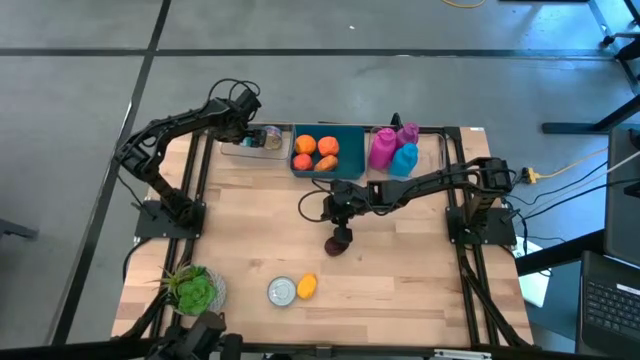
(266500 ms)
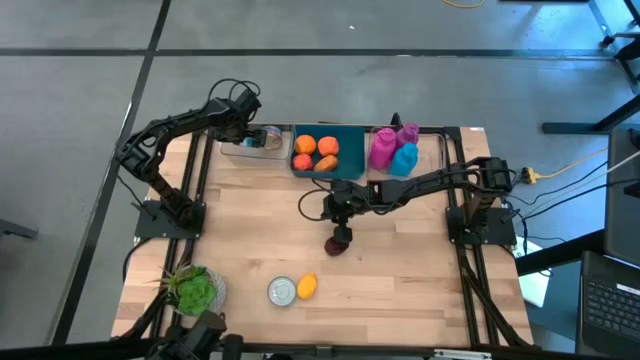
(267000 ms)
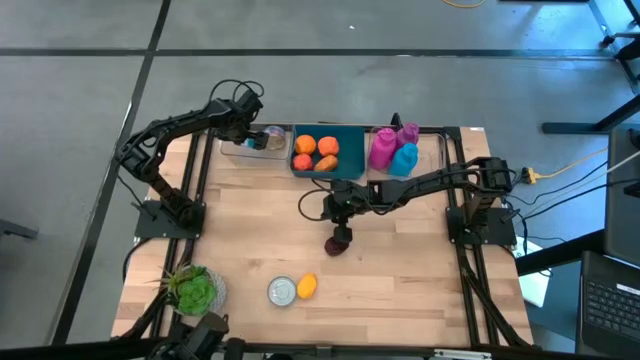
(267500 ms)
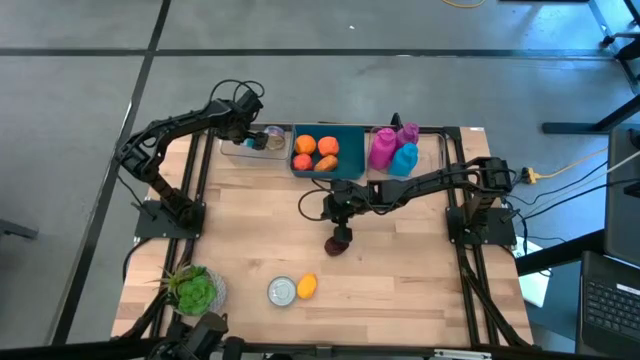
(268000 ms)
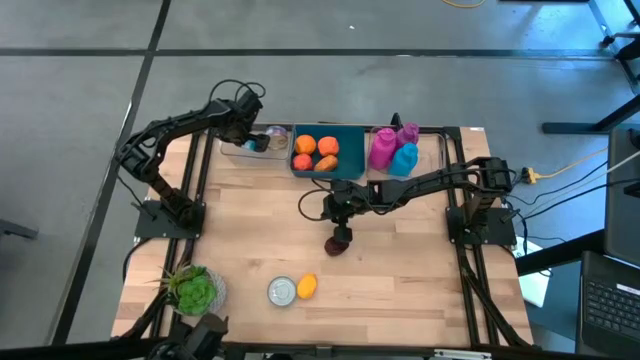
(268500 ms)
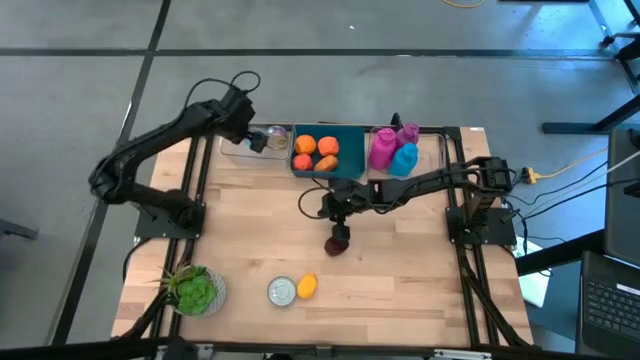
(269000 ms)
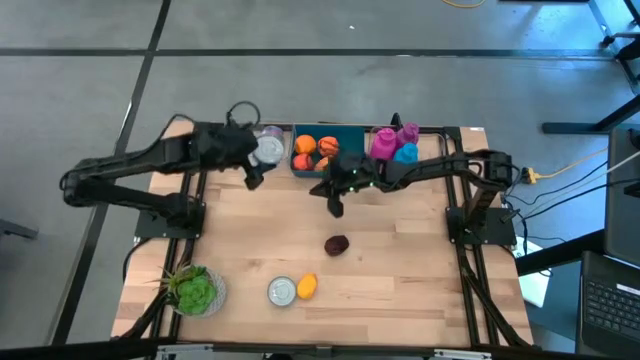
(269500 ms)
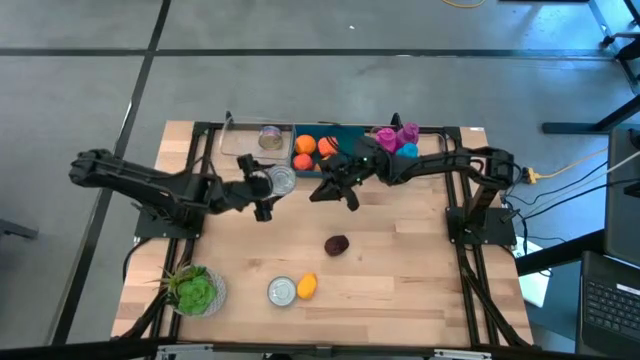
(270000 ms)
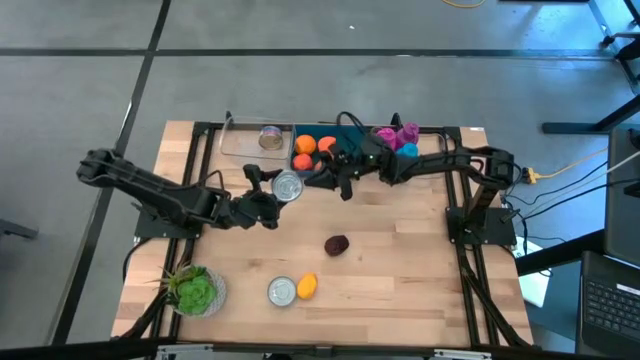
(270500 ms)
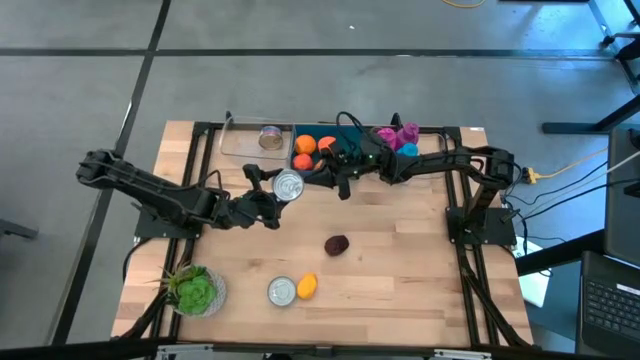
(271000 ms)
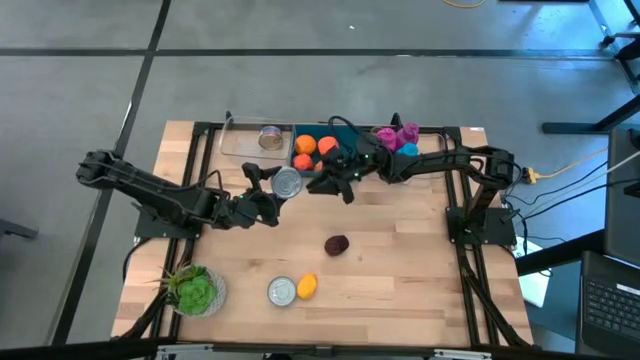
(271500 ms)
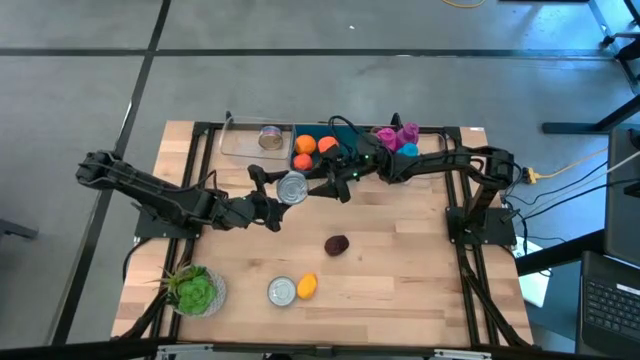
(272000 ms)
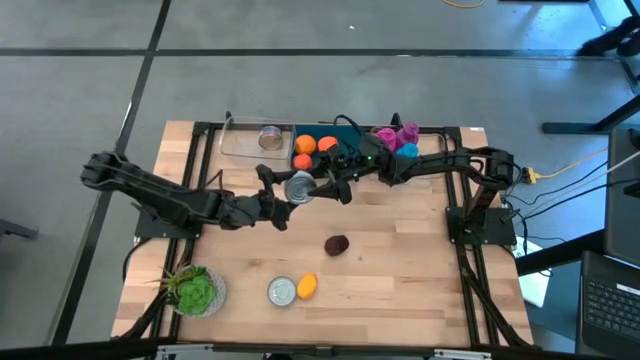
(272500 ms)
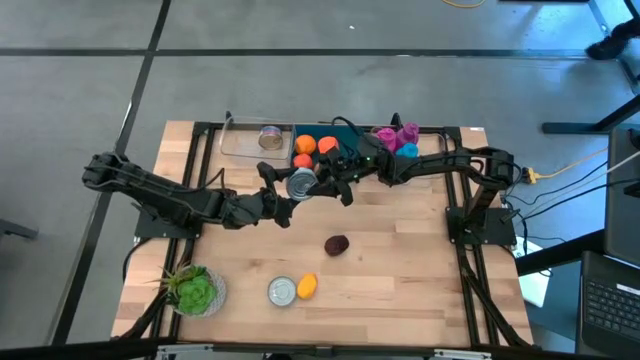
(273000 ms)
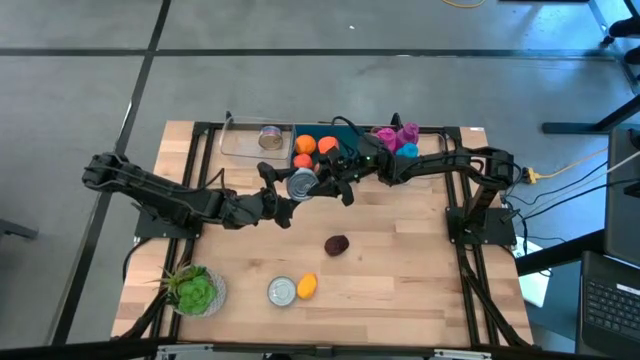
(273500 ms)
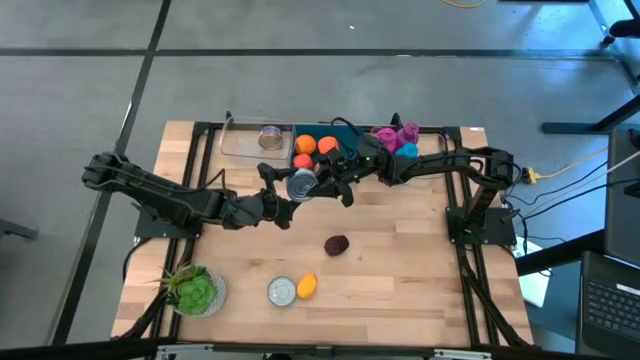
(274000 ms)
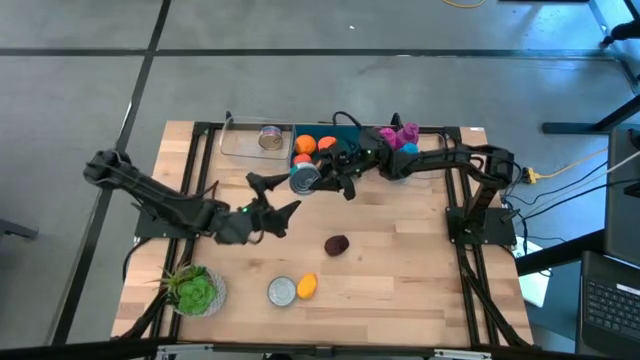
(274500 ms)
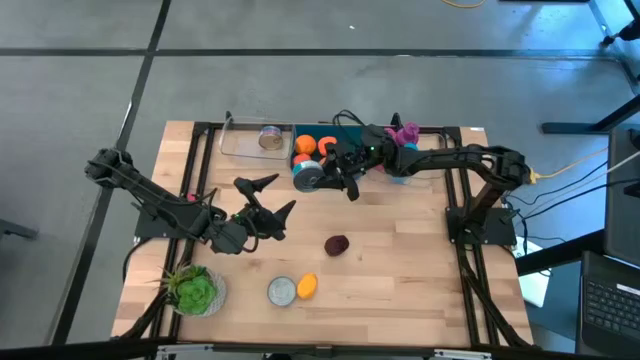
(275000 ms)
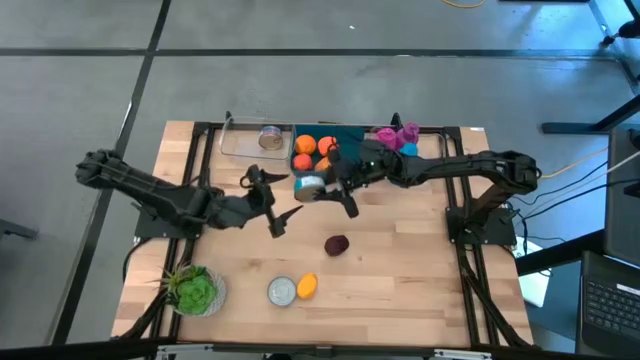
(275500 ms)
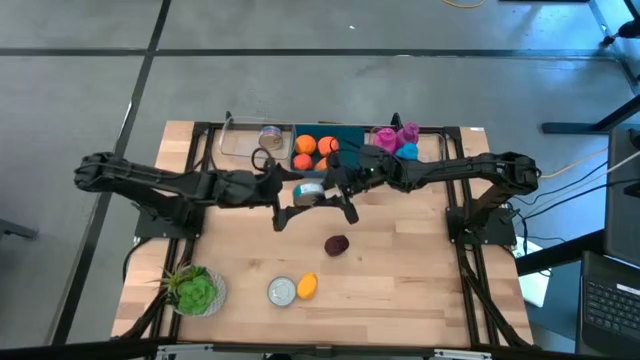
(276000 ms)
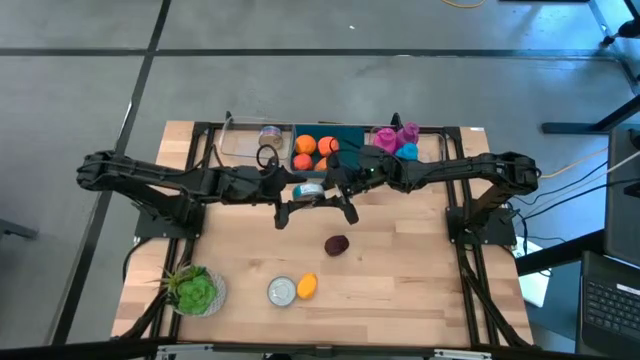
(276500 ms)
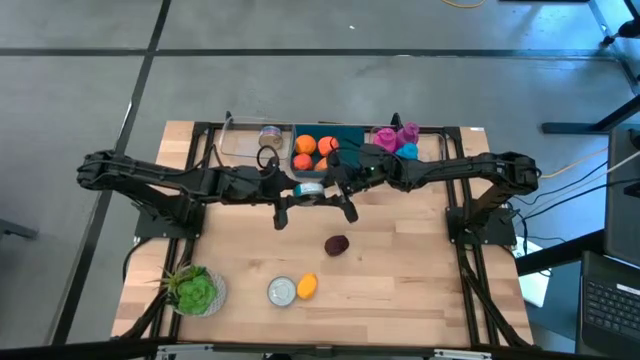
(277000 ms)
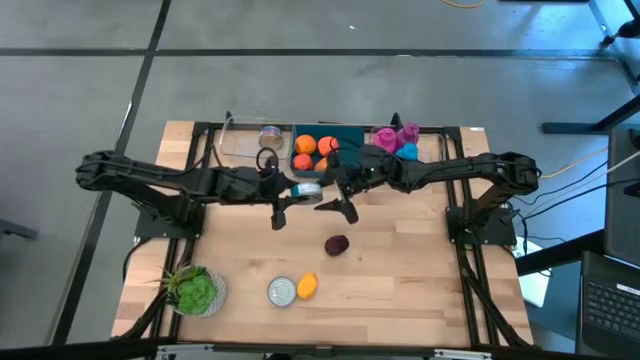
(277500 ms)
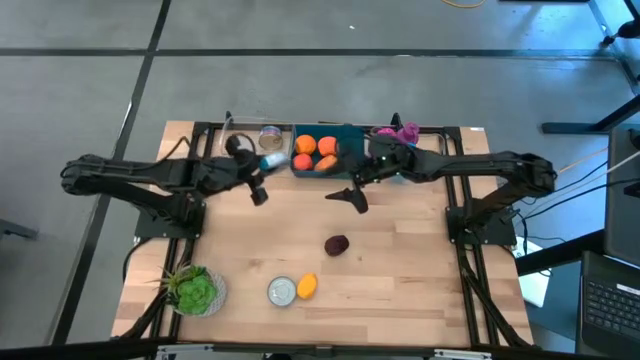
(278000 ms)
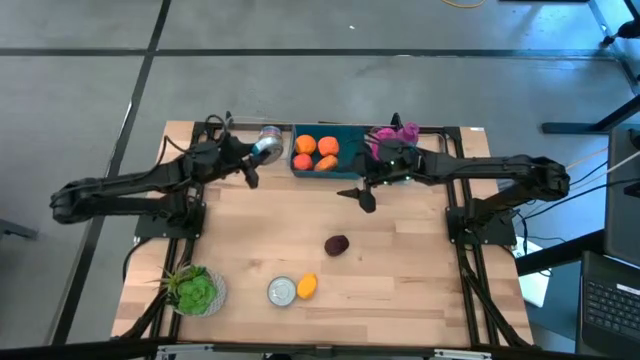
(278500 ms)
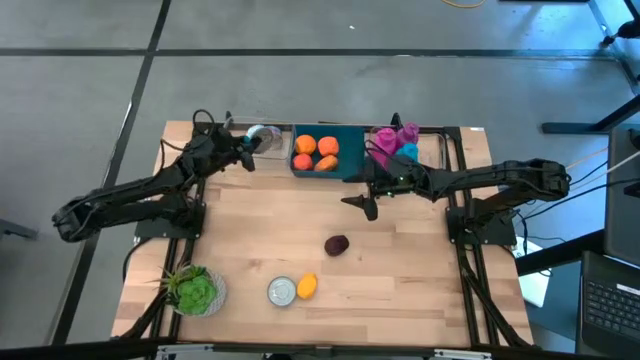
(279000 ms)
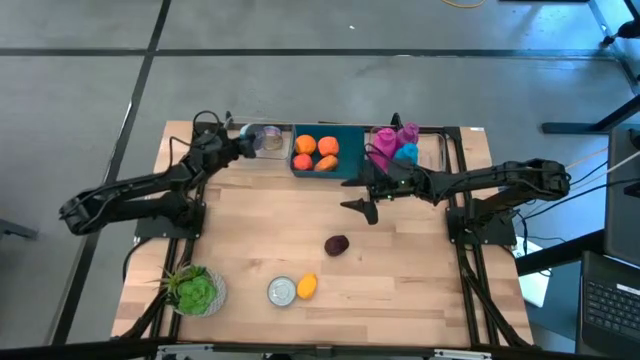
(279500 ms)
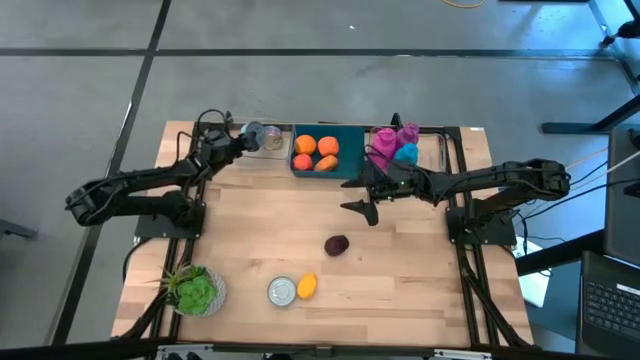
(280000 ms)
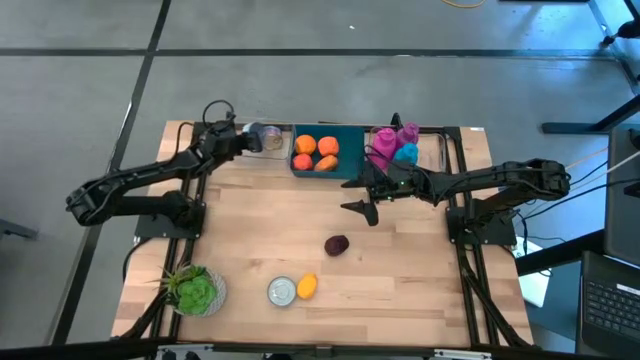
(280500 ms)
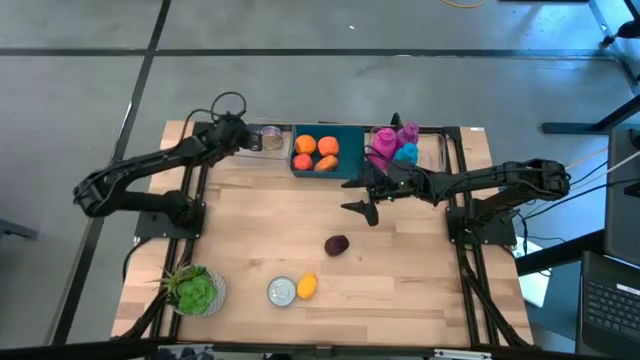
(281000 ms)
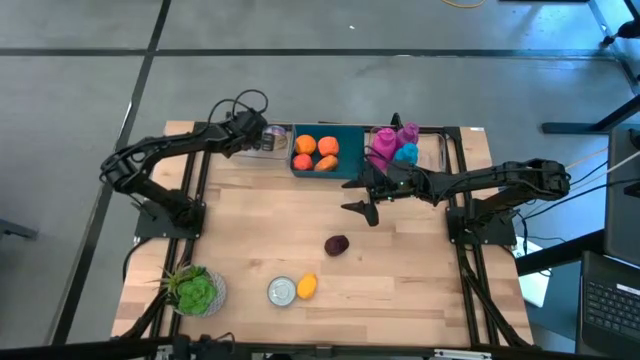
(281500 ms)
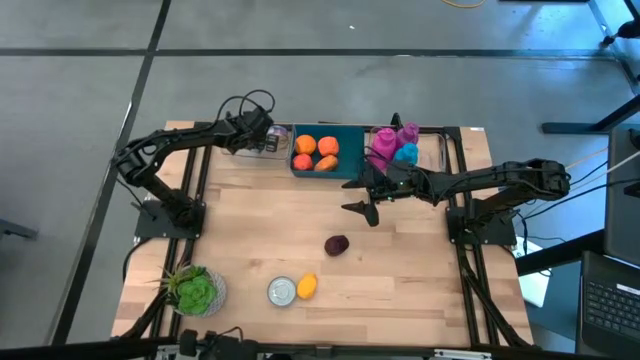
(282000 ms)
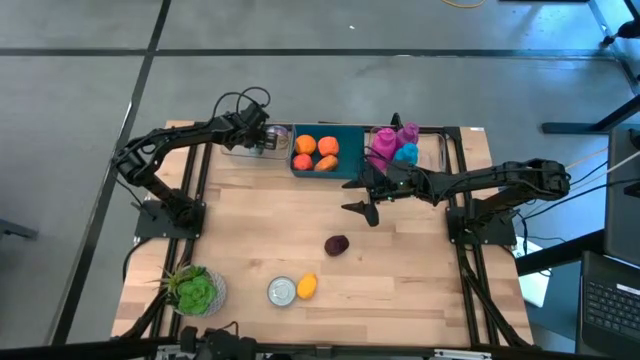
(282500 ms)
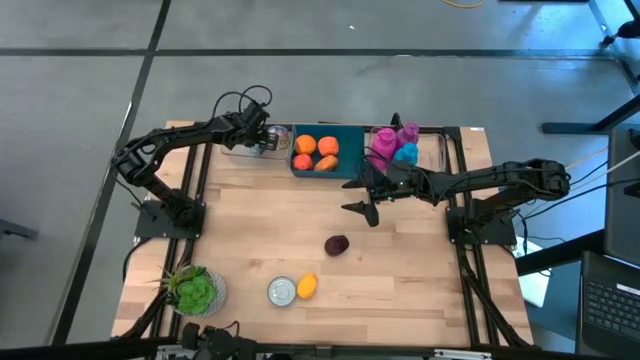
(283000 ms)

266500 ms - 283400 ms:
Task: Pick & Place Food Item
Put the top yellow blue tuna can into the left transparent bin

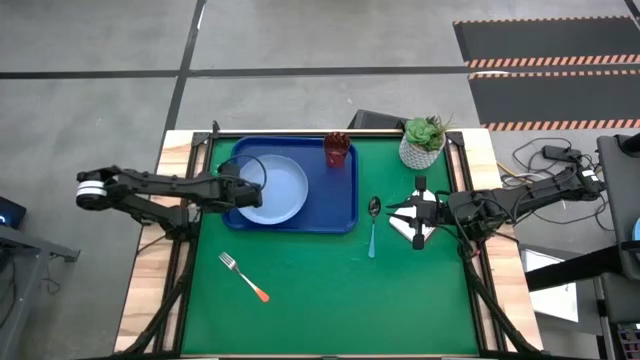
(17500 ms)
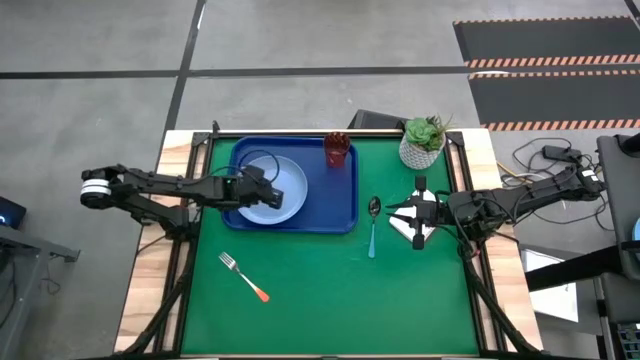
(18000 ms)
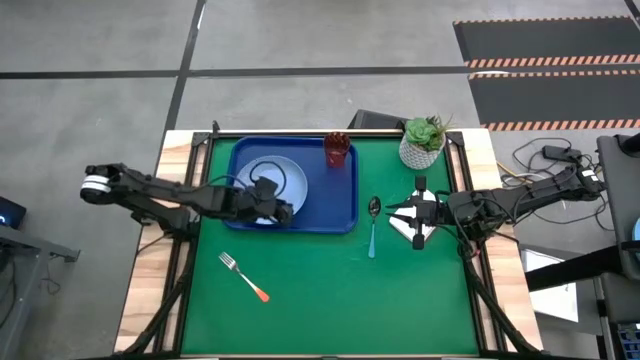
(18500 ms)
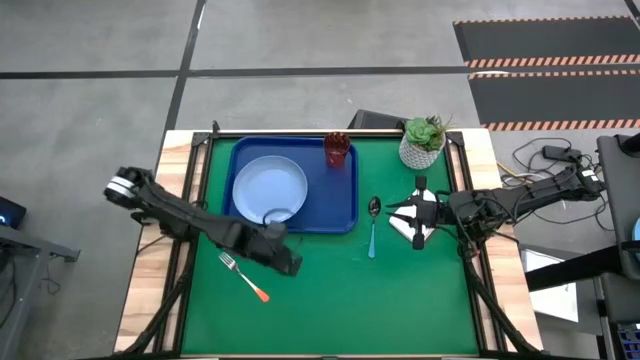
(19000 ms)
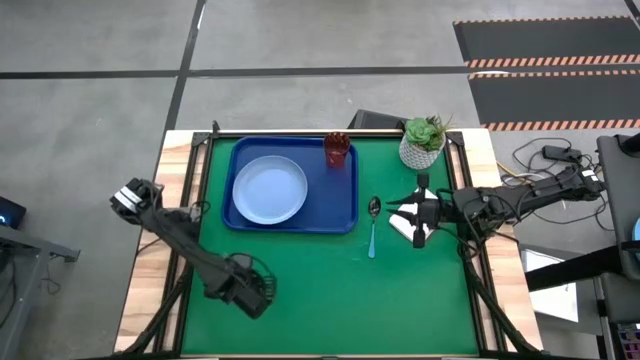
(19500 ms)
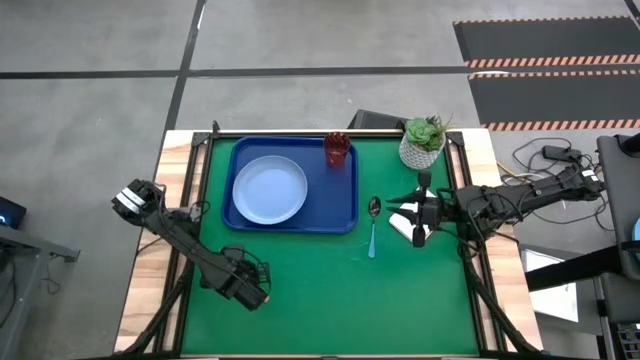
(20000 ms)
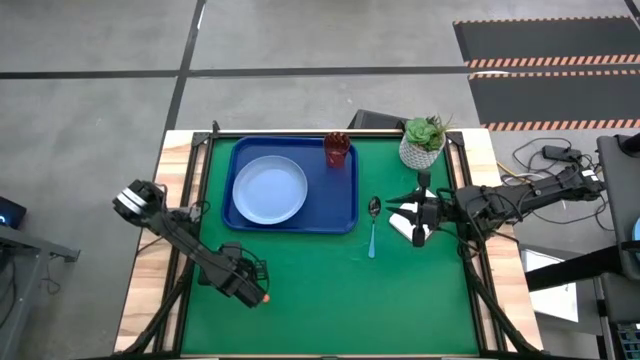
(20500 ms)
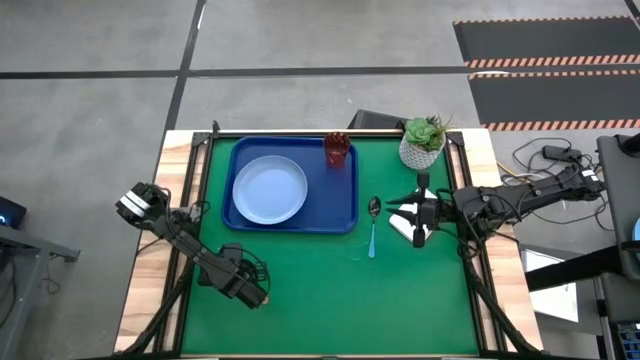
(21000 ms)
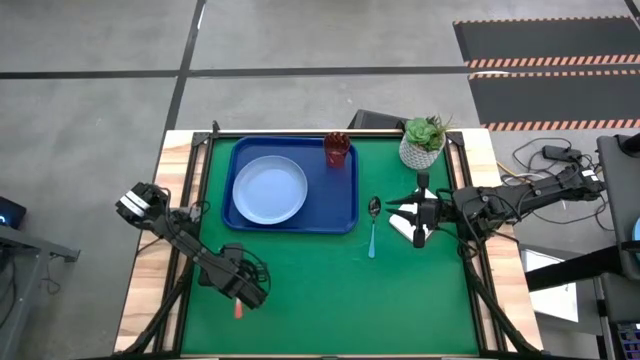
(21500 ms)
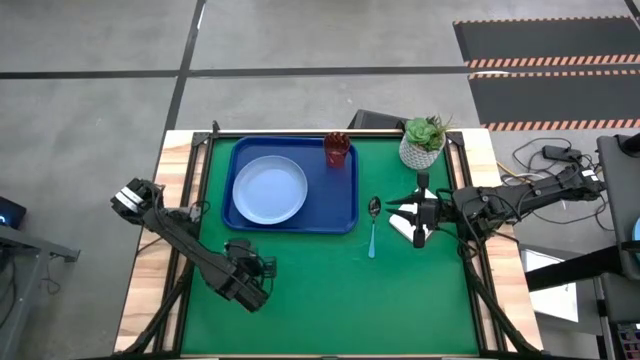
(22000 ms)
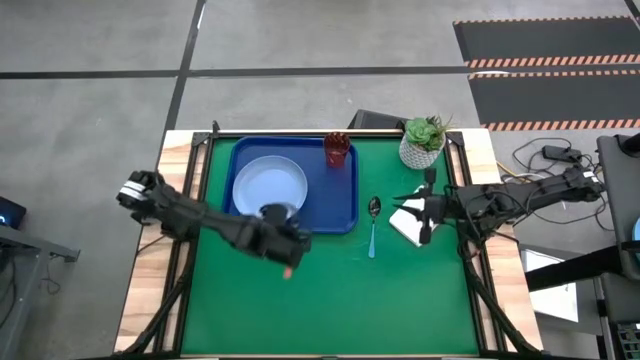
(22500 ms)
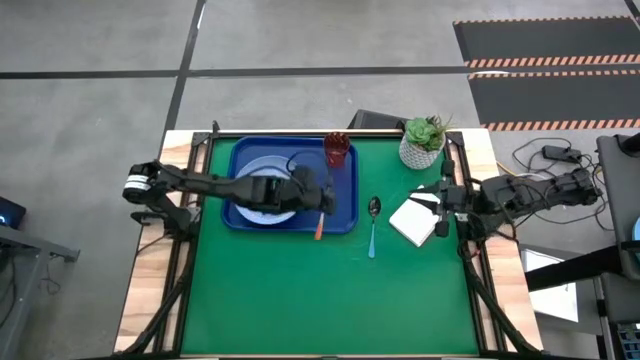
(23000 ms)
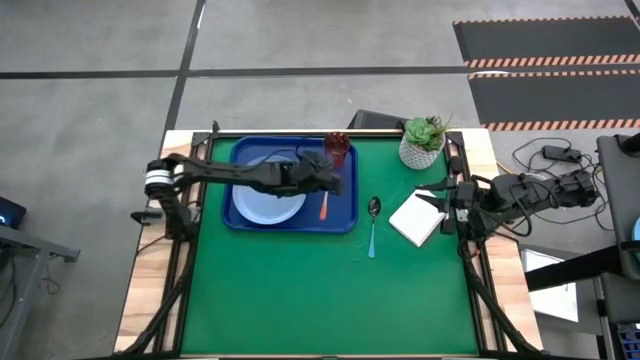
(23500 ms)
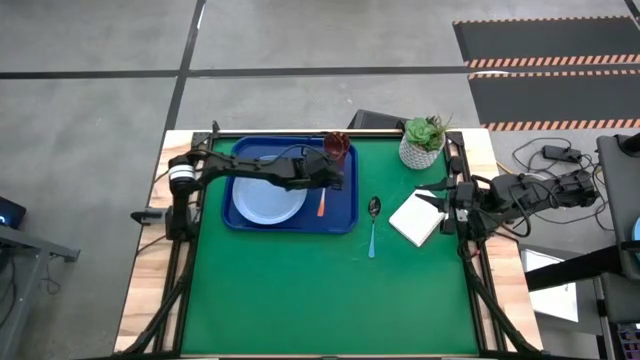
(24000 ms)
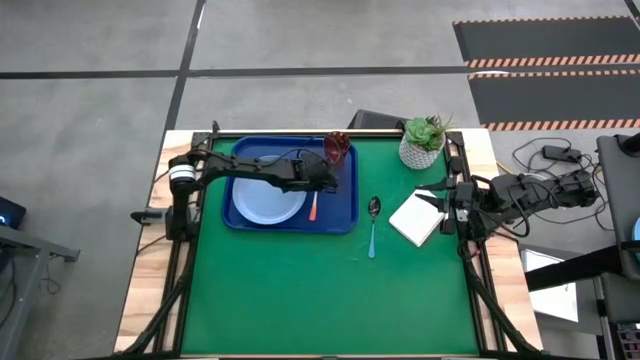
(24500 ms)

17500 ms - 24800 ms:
Task: Pick and place plate/cup/fork/spoon on tray
Put the orange fork on the blue tray to the right of the blue plate
